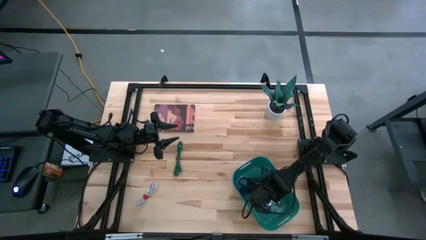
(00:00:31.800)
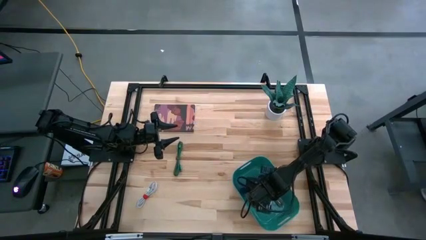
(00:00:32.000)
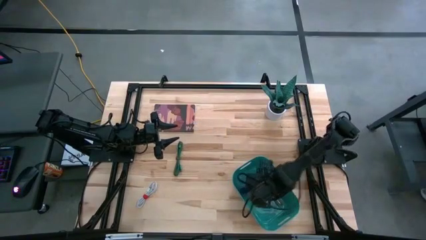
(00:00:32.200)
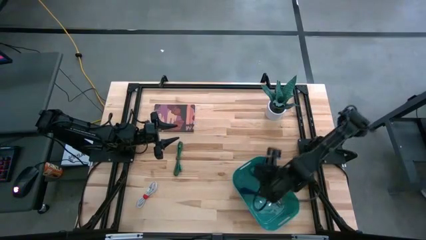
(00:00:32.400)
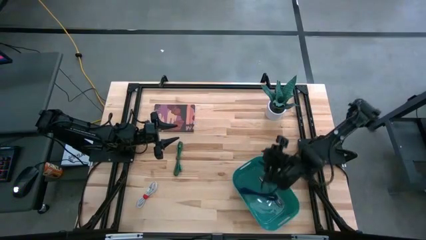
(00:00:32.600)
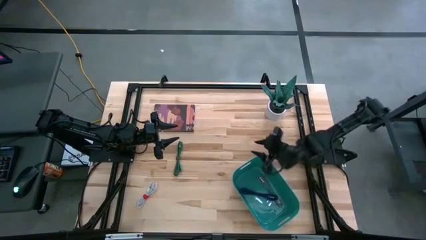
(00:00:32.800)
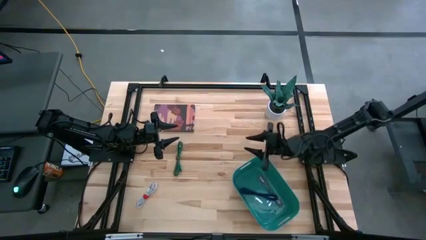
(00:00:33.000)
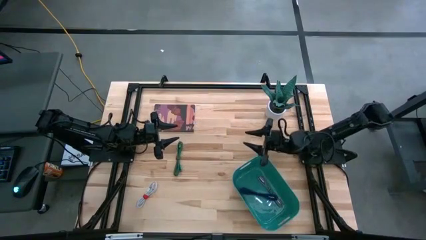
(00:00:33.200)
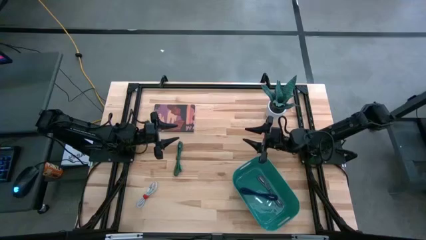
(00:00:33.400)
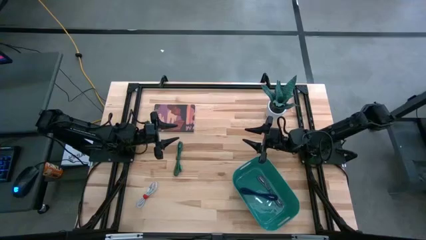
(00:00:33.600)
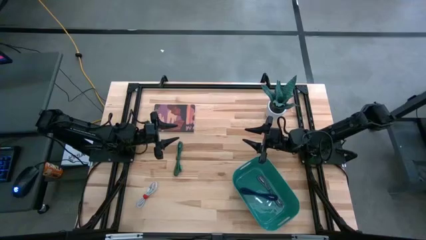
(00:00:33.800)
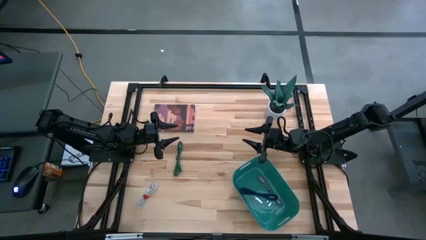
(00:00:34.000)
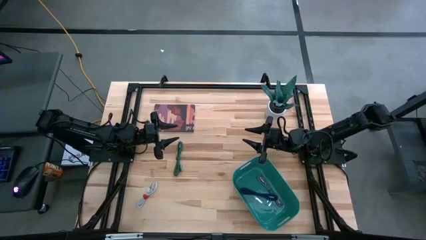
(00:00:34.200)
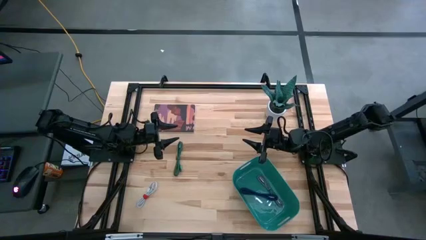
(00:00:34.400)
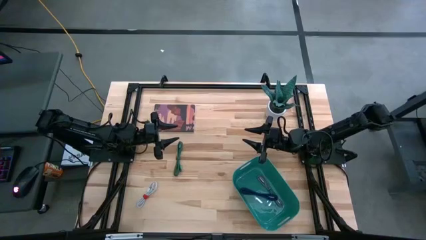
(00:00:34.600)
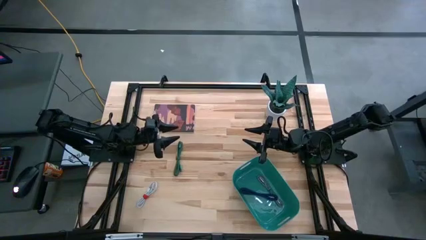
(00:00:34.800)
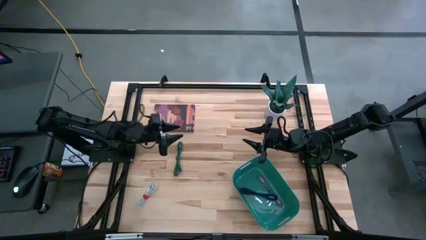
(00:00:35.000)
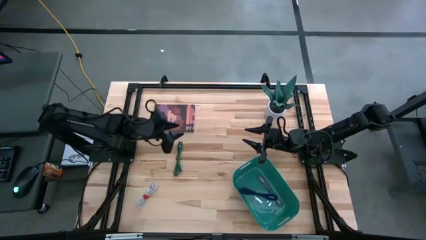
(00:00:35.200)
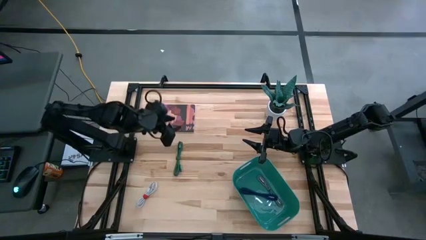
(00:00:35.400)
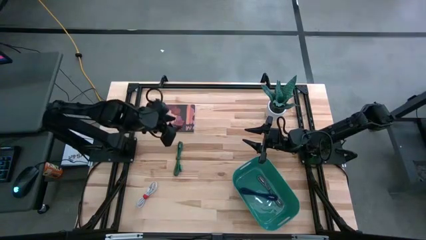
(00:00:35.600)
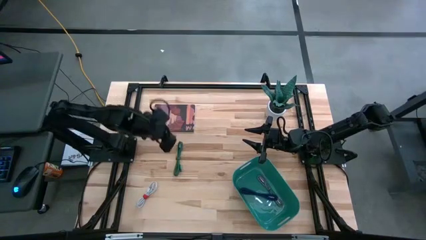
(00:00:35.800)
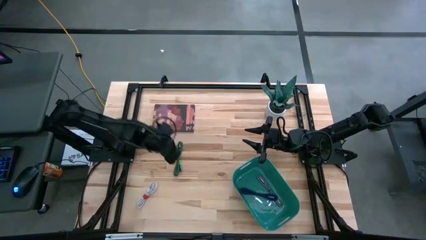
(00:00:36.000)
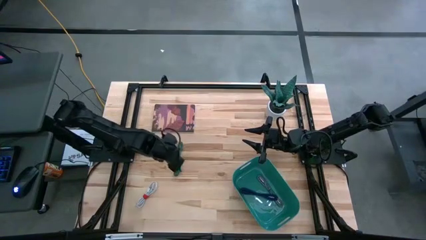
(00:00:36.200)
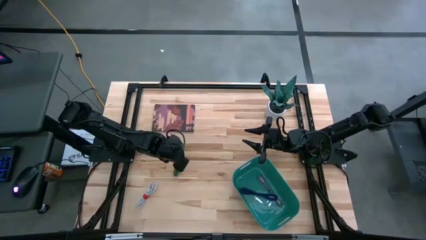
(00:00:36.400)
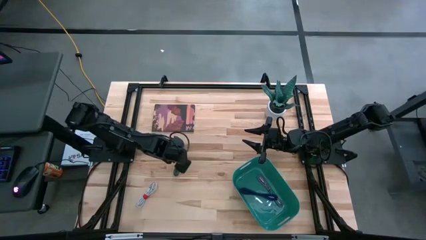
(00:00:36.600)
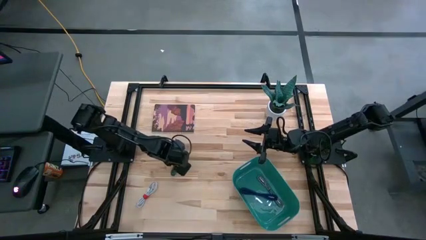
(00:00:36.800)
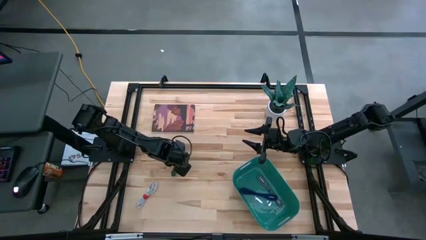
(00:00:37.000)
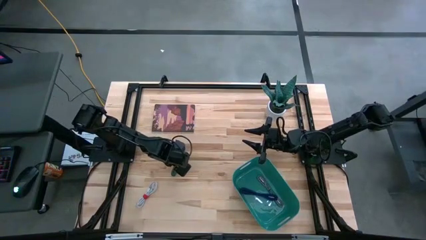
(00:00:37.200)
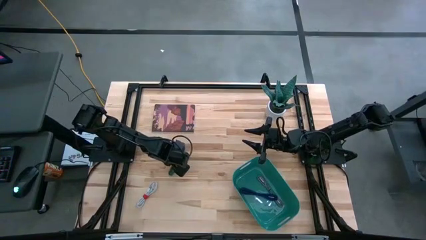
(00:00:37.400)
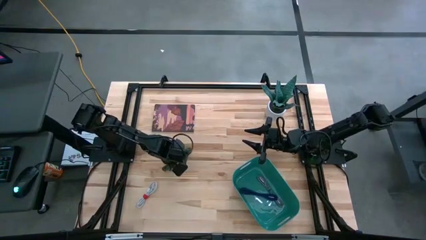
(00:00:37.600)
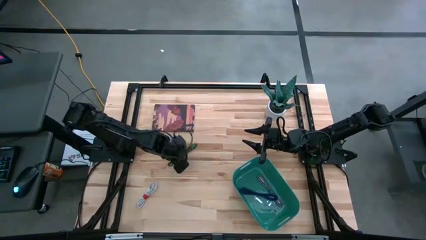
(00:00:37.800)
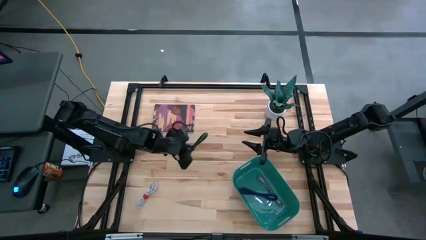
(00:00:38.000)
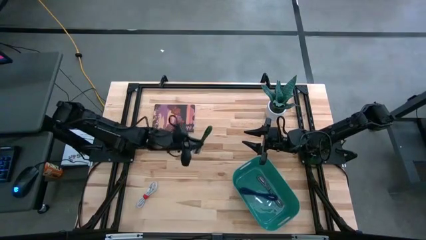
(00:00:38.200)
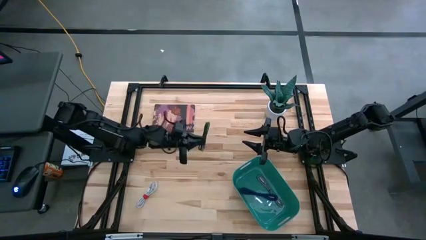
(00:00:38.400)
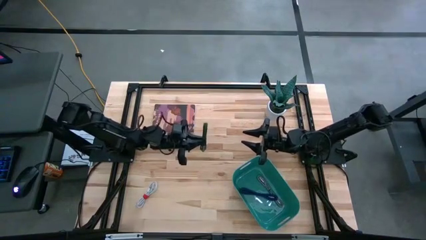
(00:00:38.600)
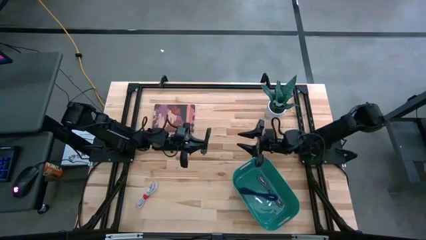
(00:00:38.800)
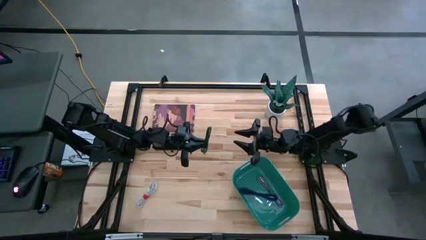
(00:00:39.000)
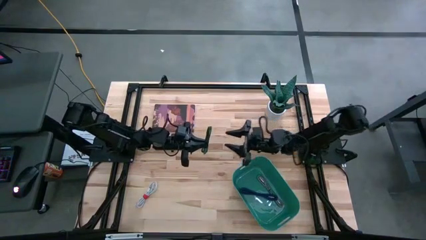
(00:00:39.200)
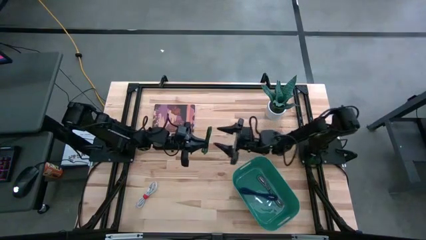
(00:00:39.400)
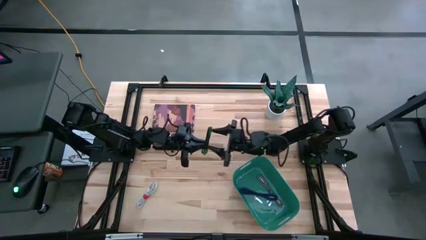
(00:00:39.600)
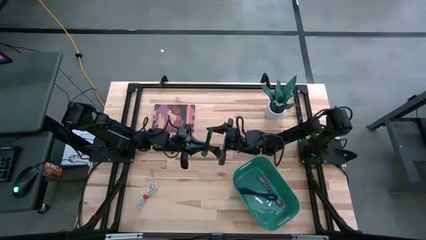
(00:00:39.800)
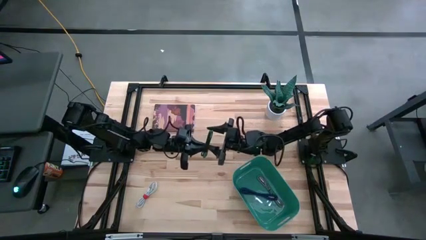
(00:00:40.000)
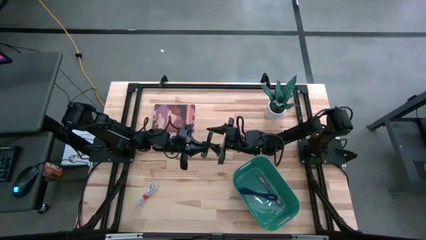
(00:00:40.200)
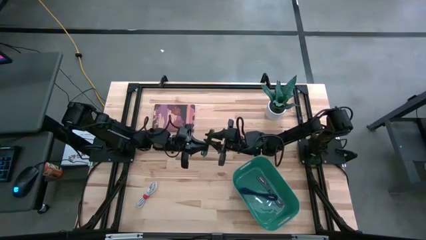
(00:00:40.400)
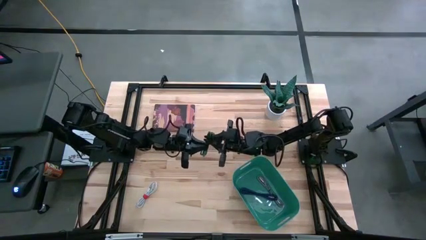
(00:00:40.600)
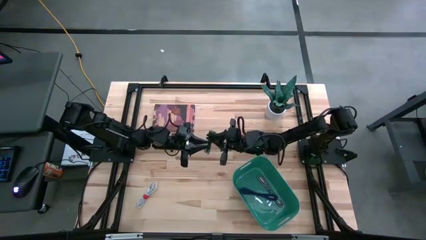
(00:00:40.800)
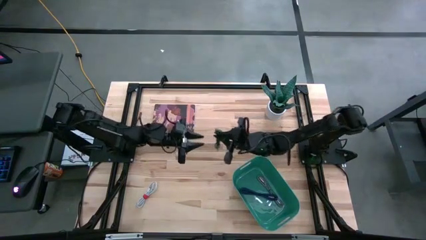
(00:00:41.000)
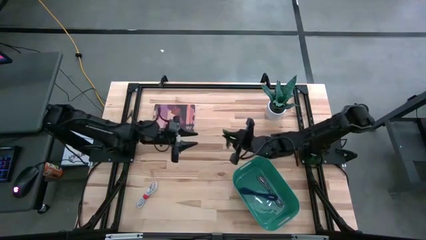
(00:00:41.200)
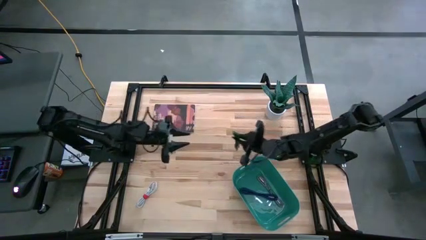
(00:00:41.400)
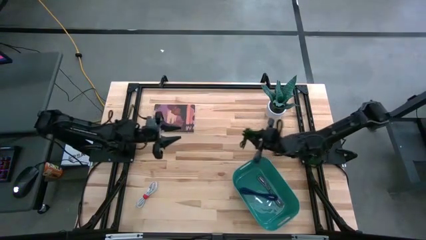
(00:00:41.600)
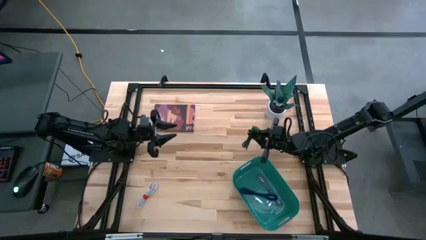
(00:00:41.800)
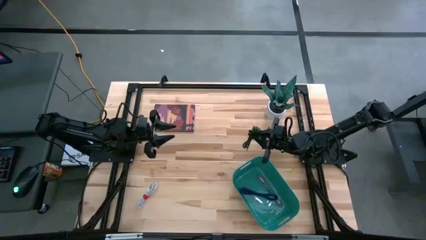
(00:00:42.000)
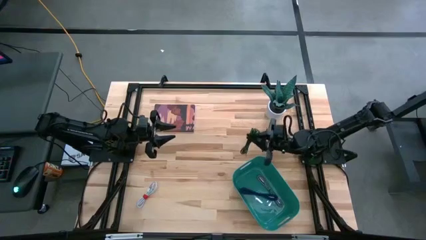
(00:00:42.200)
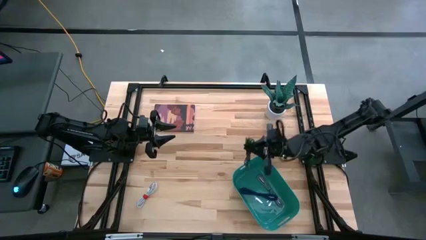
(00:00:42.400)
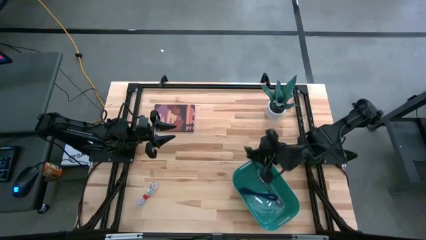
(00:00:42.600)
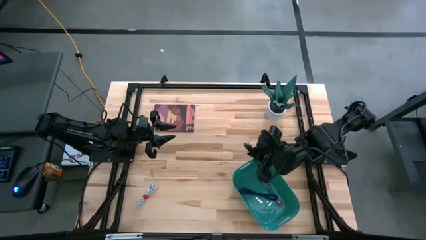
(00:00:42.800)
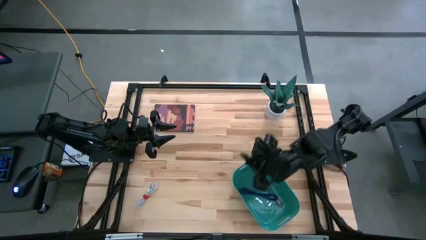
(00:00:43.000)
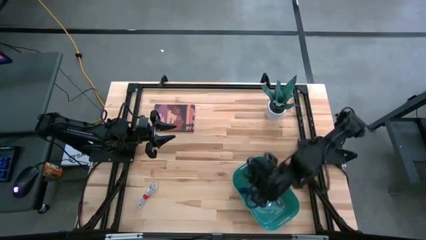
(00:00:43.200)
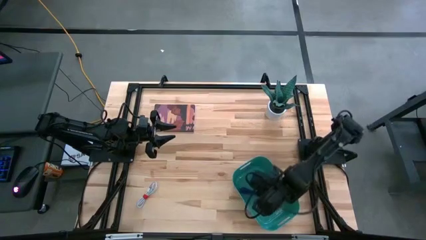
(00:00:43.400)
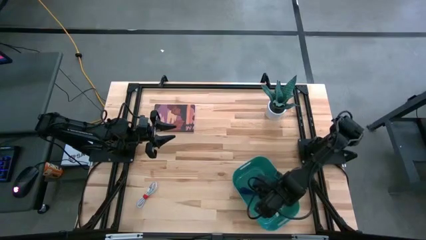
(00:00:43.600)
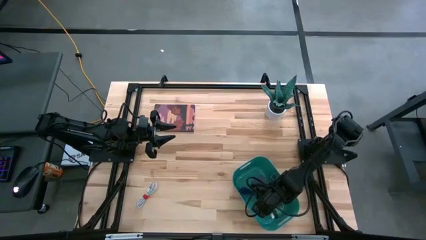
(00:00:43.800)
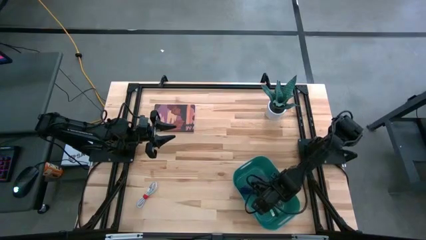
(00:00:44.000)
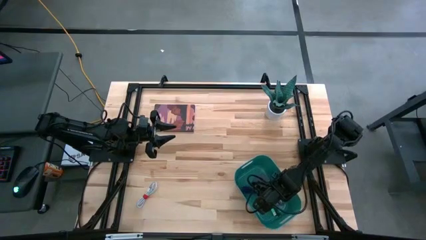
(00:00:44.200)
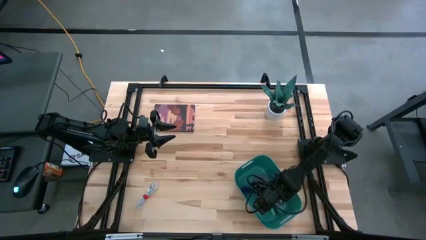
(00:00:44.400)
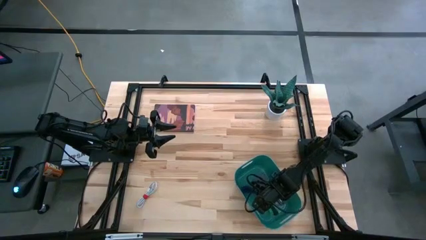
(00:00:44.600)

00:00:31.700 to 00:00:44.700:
Task: Pick and place USB-C Cables
Put the green USB cable into the green bin
